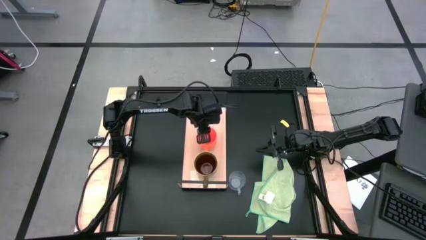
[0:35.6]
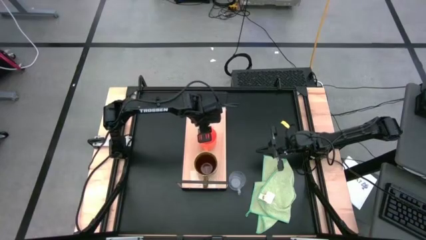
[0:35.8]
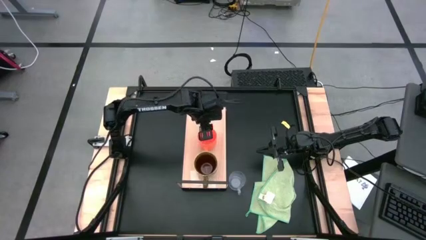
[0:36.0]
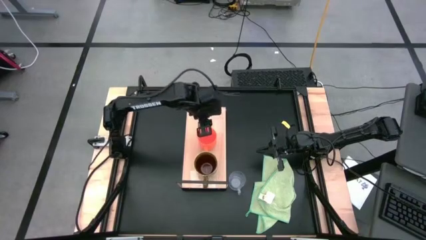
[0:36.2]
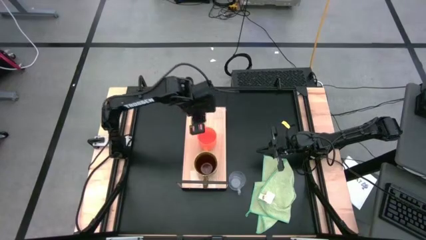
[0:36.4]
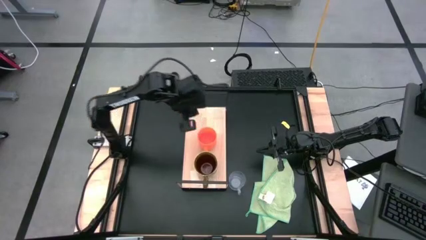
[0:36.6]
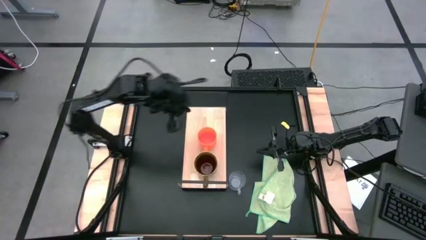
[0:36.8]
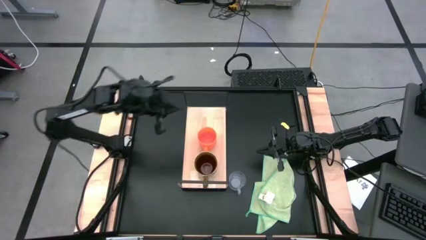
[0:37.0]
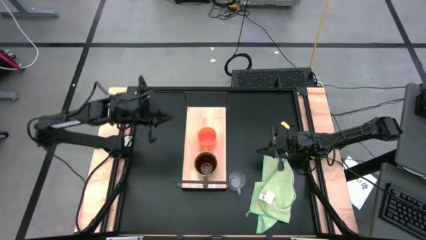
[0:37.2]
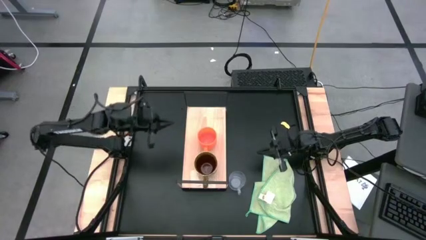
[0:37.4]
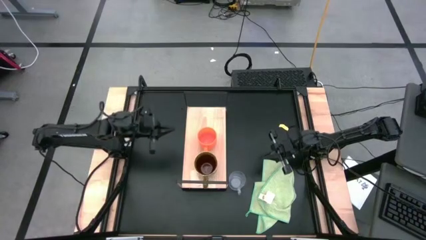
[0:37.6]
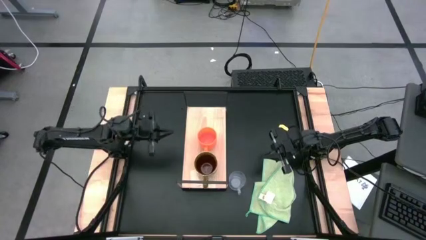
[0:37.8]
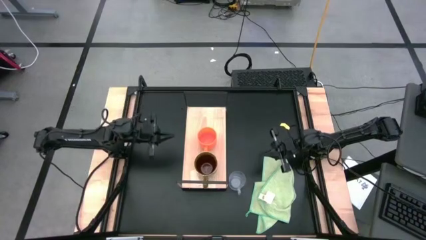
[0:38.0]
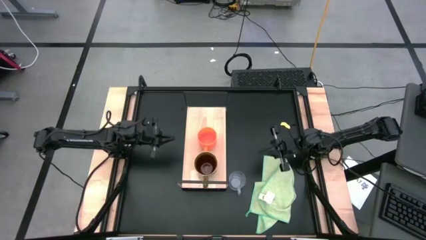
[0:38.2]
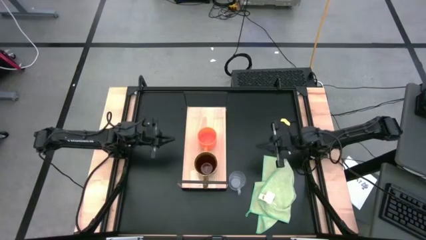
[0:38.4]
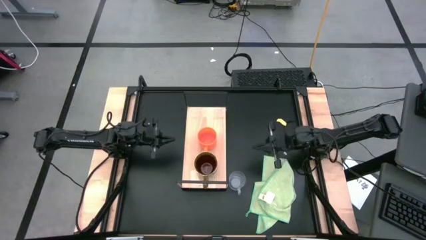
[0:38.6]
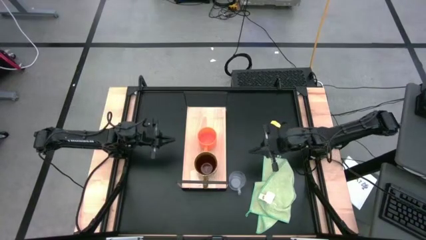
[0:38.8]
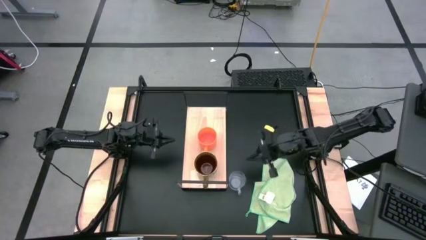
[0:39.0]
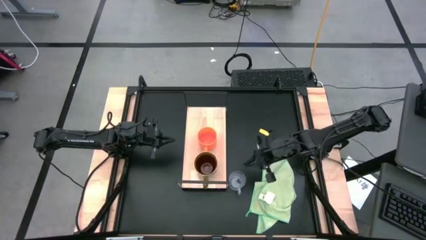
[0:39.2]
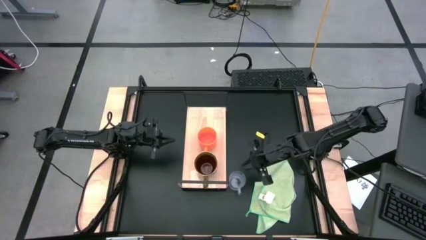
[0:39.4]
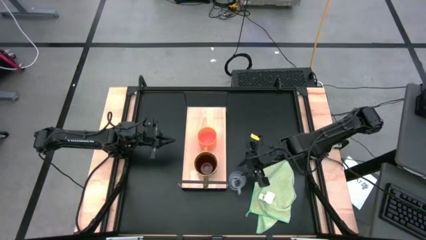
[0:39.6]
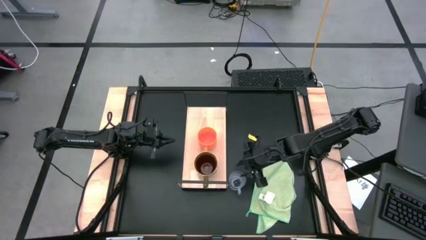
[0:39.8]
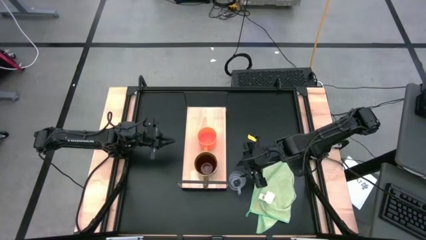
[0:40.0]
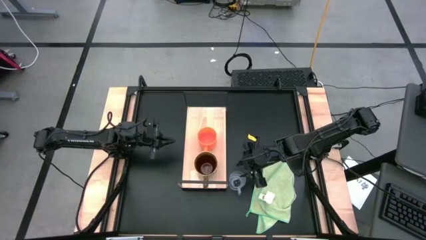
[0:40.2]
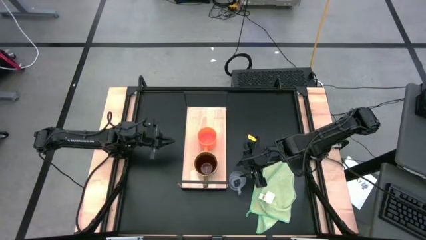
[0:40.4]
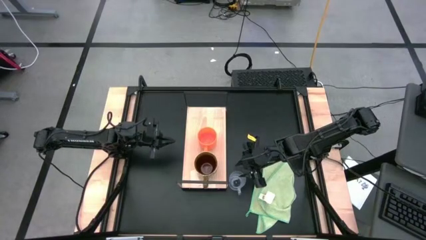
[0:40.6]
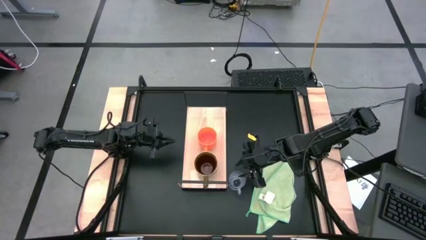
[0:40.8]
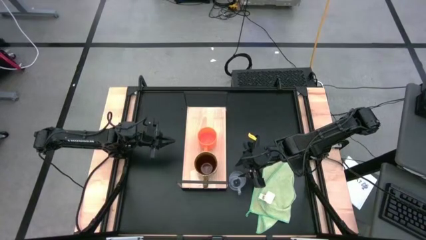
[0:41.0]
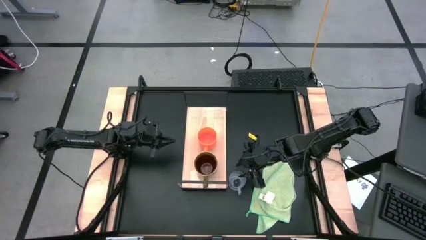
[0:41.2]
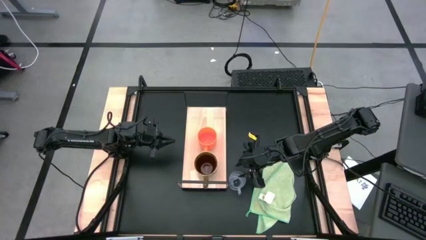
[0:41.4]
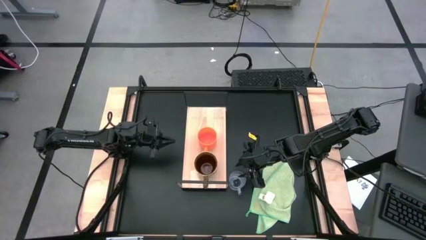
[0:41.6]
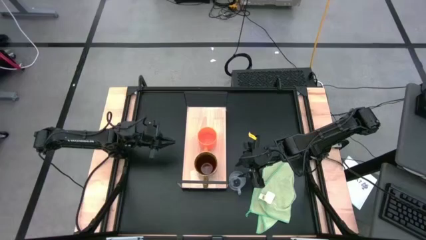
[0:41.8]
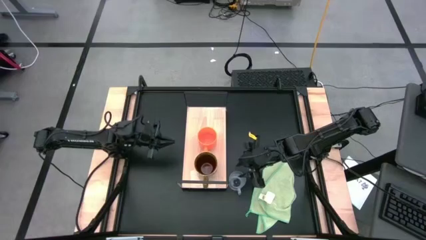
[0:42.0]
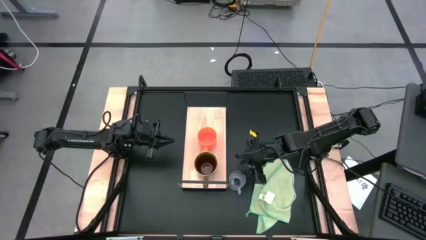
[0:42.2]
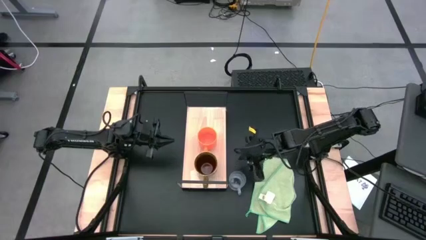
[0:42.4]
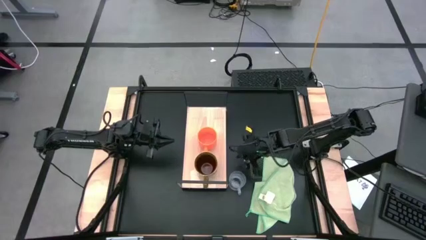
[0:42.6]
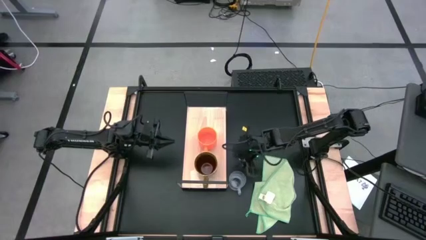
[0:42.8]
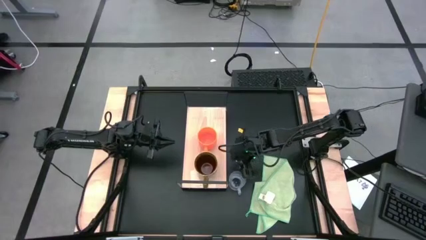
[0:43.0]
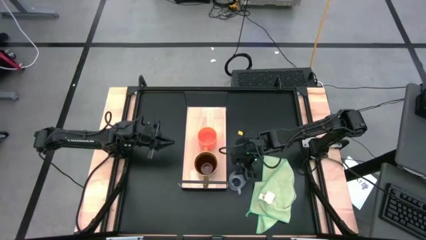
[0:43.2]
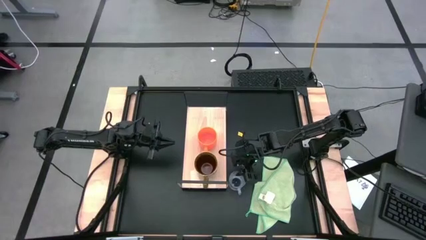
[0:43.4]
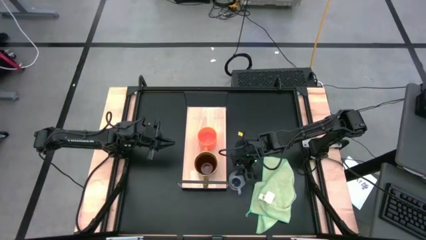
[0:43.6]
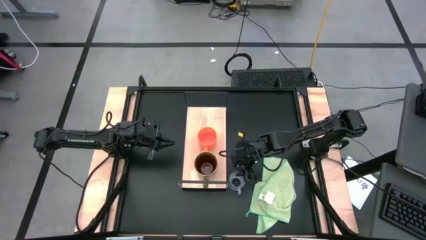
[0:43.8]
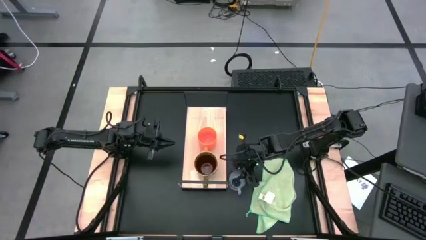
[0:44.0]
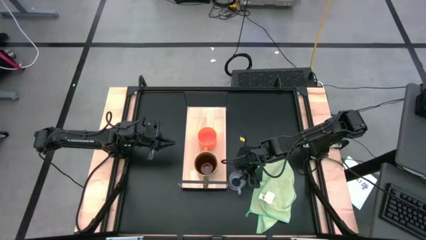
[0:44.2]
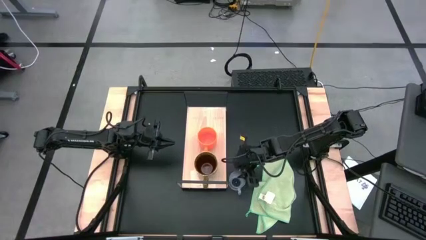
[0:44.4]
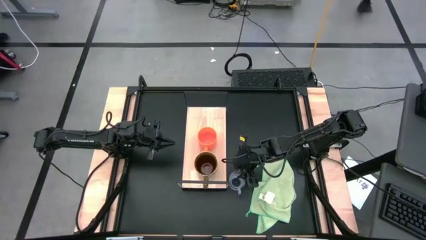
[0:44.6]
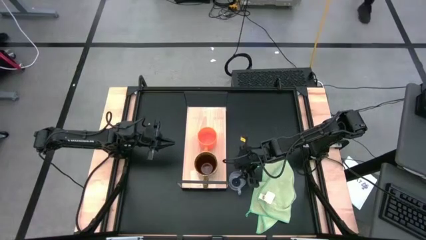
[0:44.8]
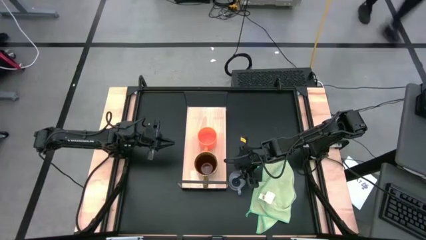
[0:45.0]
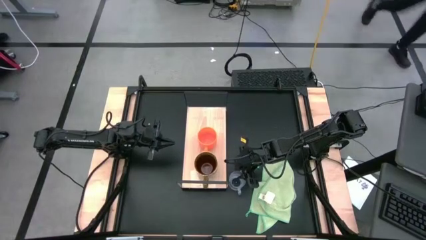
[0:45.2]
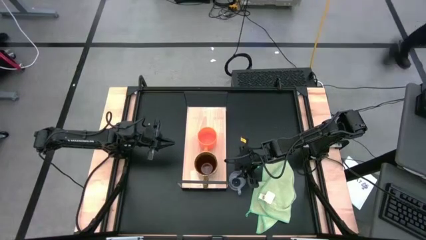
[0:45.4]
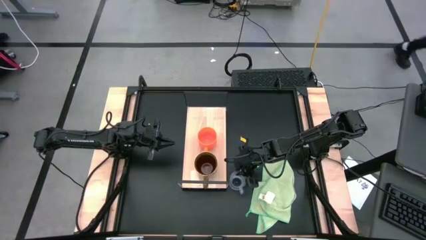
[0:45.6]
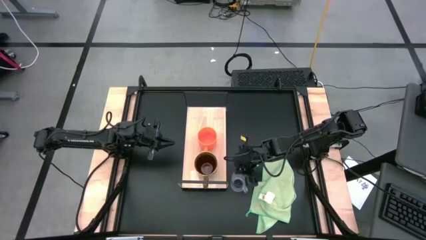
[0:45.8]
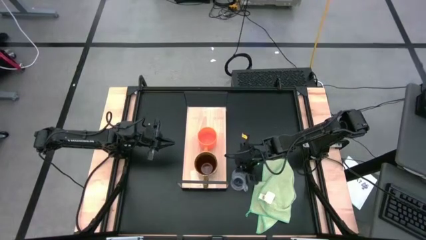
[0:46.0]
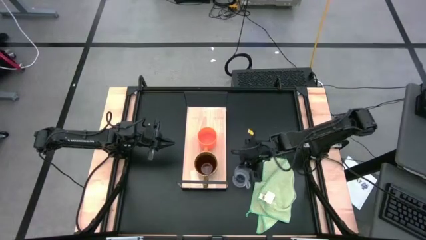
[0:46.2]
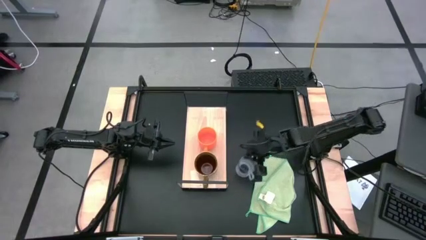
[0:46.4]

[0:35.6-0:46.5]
Task: Stack small to large cups/mugs on shelf
Put the transparent mug on the shelf
